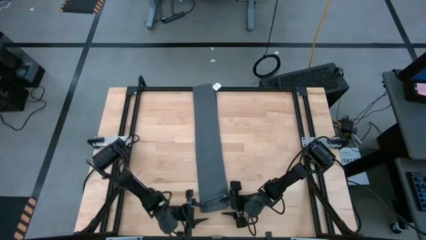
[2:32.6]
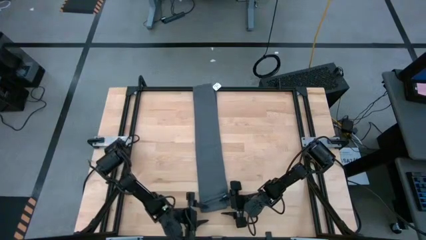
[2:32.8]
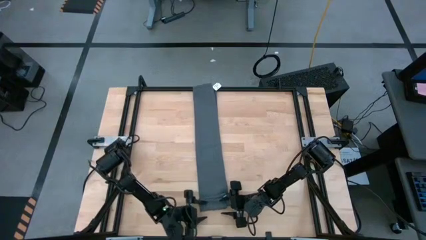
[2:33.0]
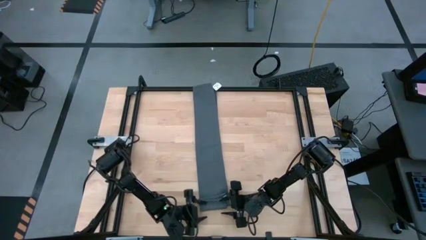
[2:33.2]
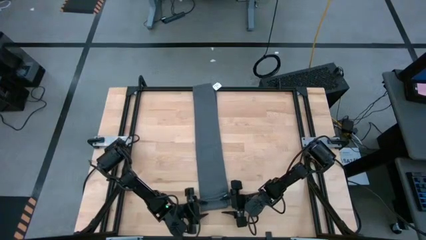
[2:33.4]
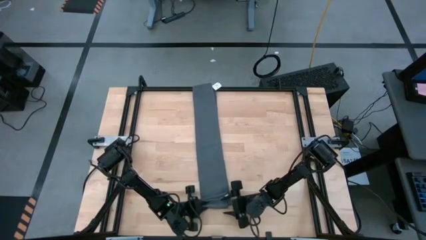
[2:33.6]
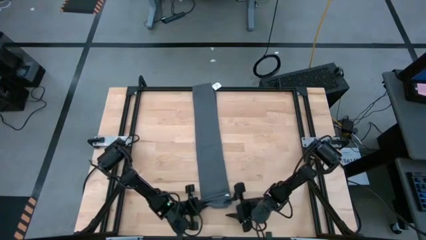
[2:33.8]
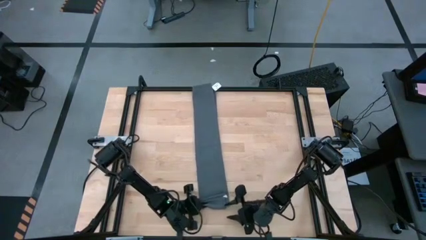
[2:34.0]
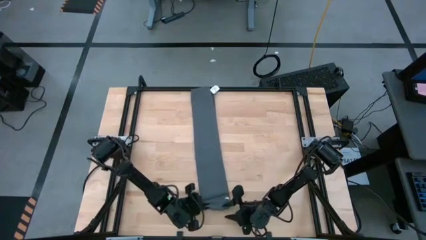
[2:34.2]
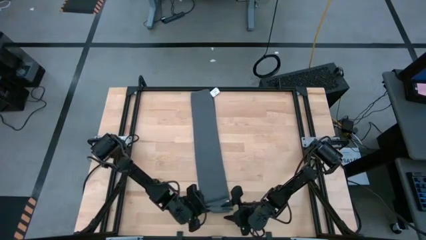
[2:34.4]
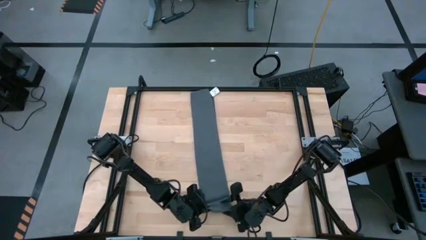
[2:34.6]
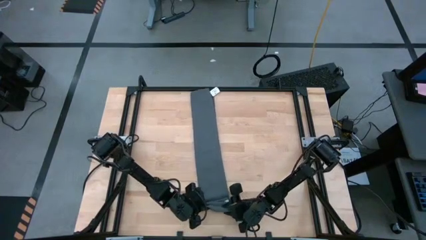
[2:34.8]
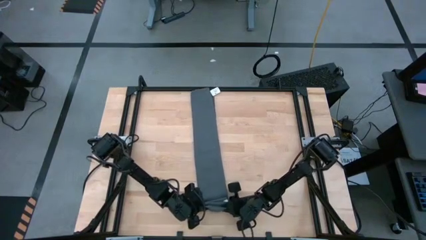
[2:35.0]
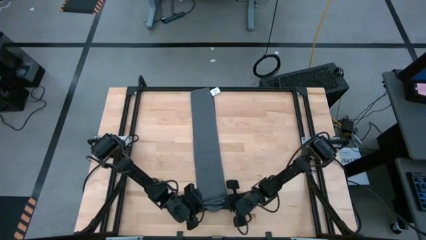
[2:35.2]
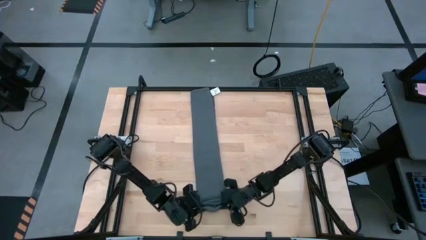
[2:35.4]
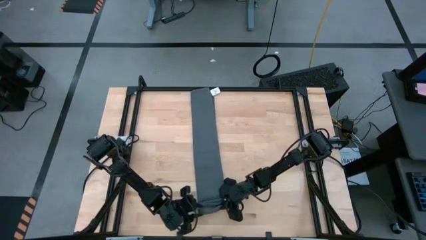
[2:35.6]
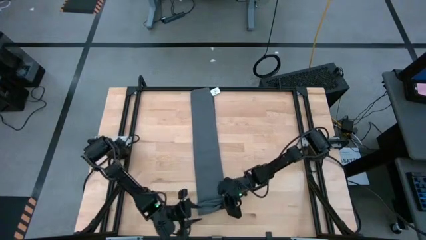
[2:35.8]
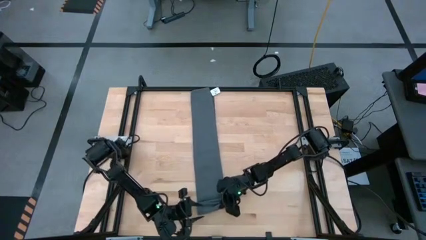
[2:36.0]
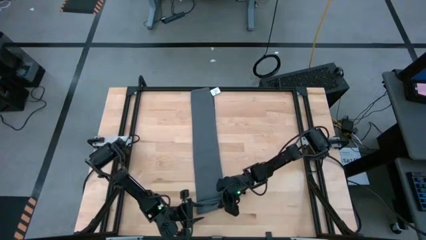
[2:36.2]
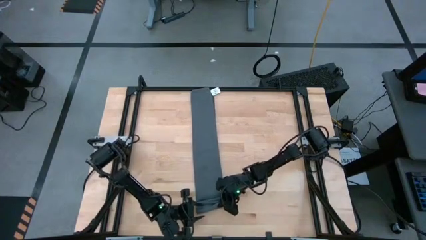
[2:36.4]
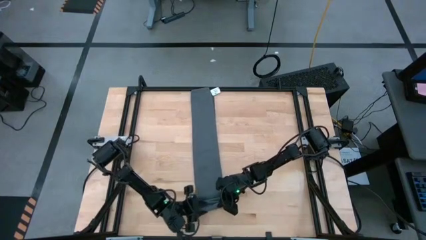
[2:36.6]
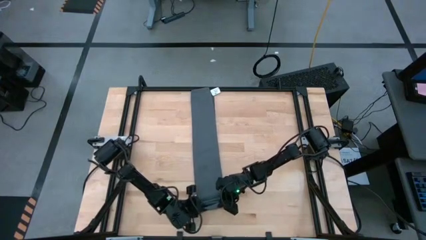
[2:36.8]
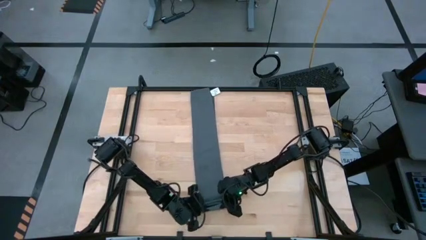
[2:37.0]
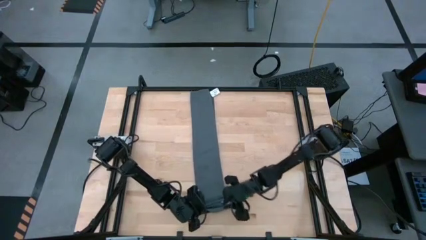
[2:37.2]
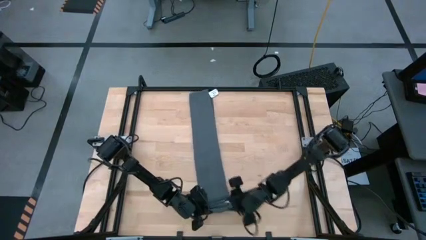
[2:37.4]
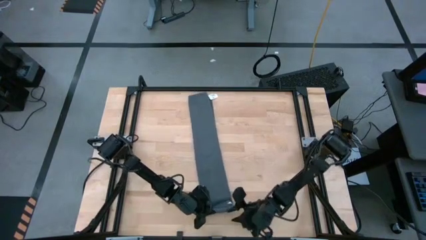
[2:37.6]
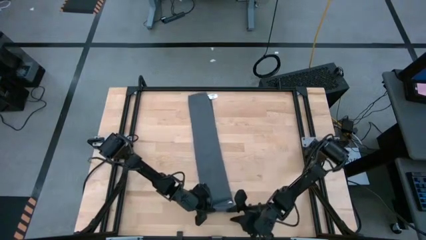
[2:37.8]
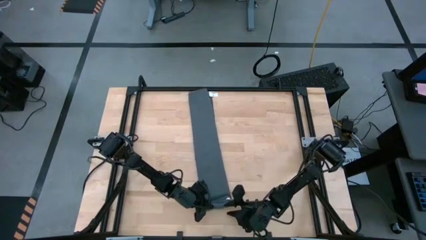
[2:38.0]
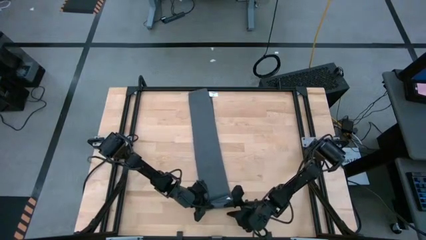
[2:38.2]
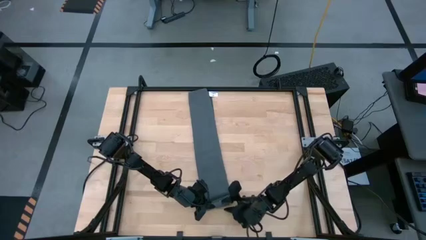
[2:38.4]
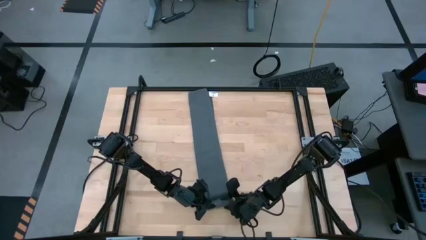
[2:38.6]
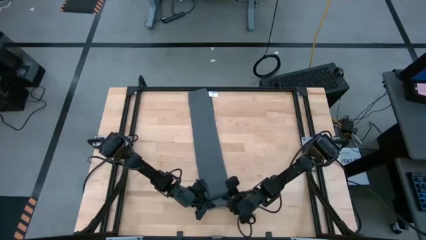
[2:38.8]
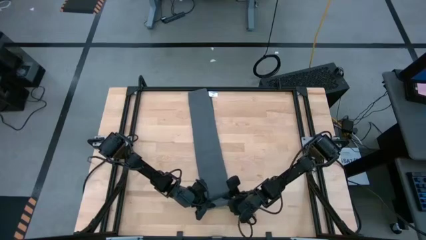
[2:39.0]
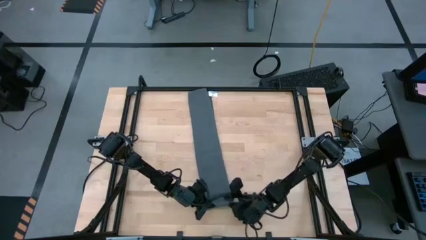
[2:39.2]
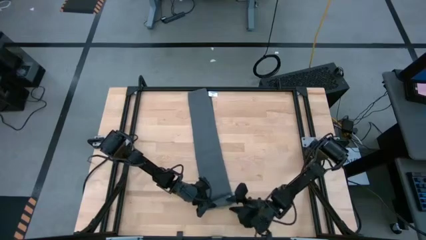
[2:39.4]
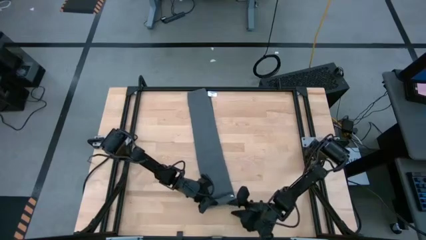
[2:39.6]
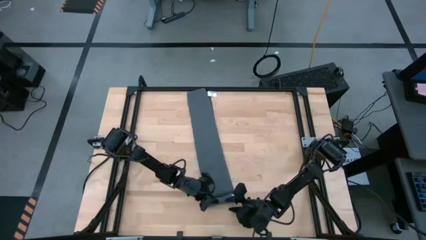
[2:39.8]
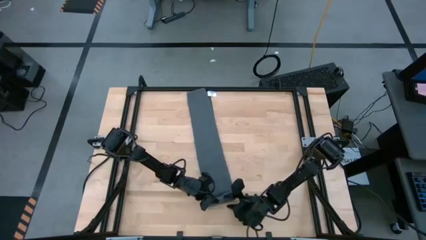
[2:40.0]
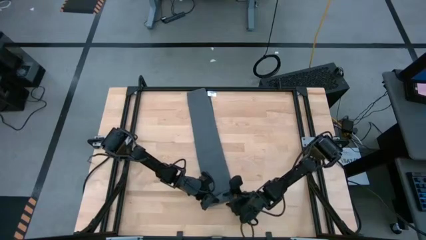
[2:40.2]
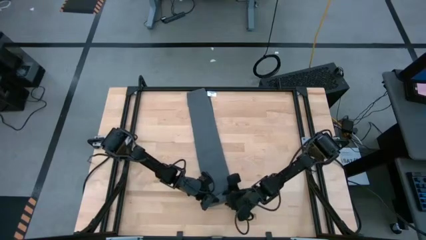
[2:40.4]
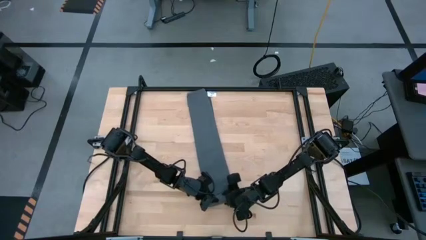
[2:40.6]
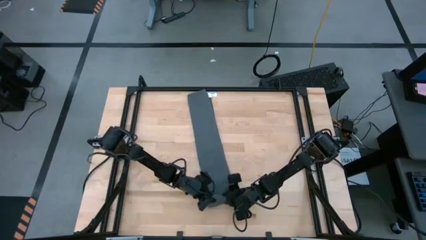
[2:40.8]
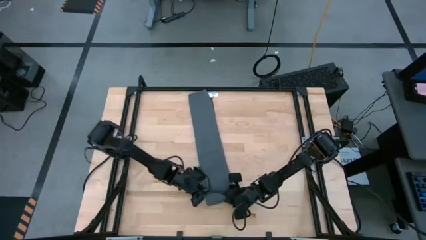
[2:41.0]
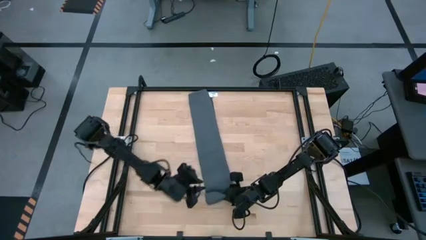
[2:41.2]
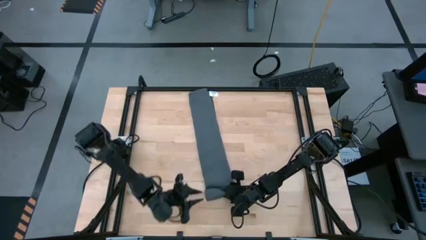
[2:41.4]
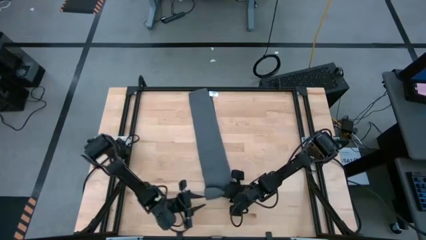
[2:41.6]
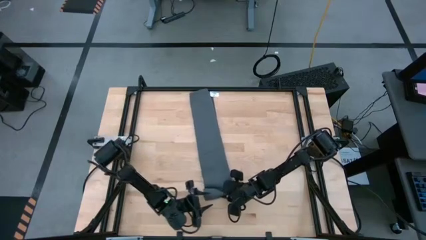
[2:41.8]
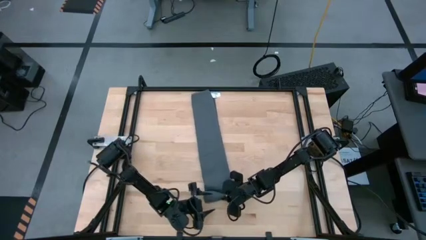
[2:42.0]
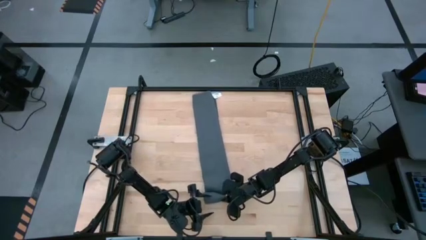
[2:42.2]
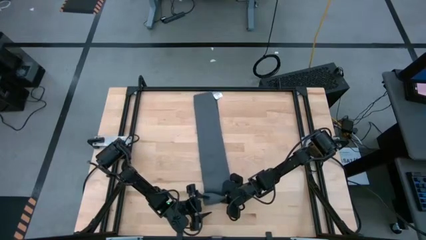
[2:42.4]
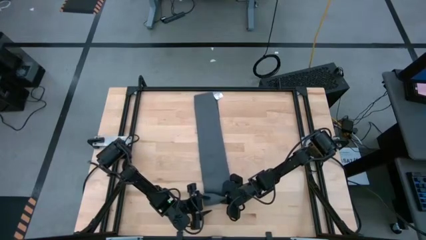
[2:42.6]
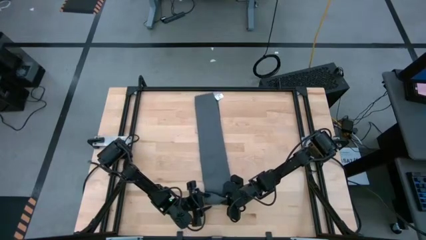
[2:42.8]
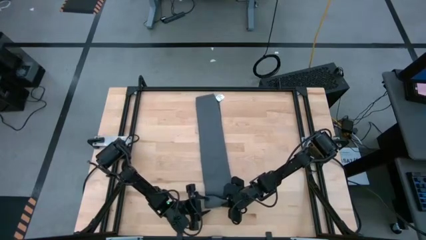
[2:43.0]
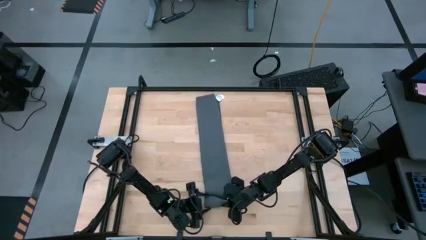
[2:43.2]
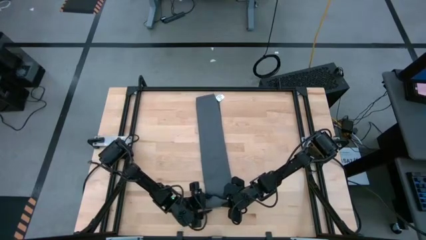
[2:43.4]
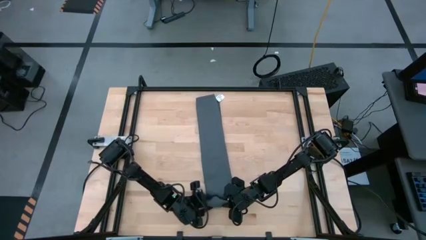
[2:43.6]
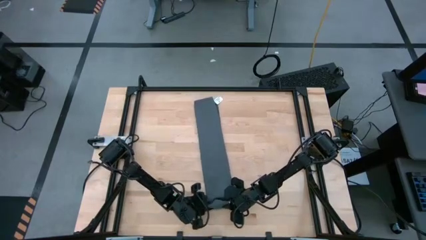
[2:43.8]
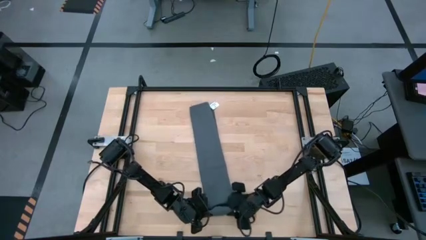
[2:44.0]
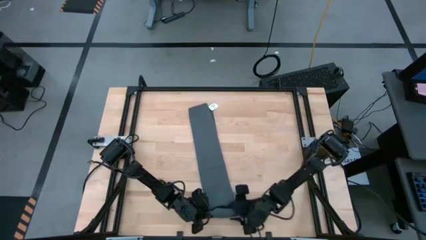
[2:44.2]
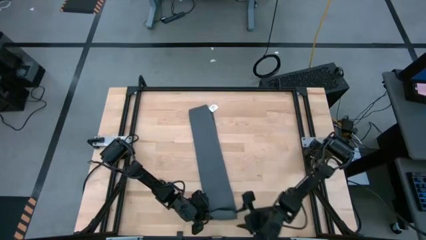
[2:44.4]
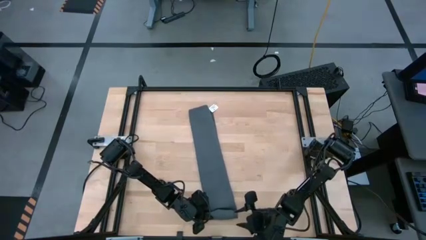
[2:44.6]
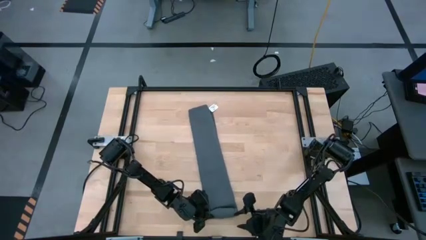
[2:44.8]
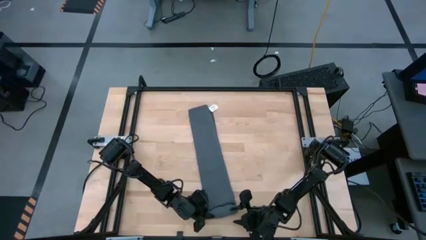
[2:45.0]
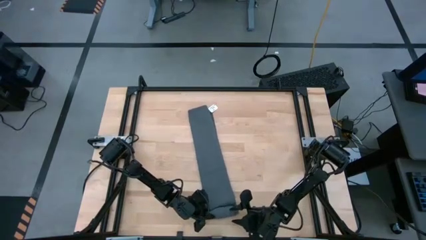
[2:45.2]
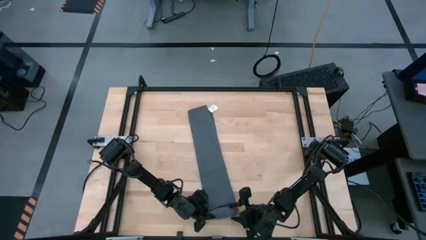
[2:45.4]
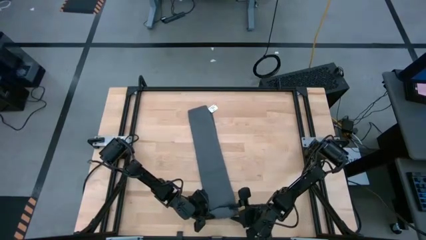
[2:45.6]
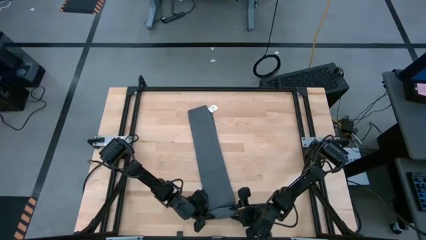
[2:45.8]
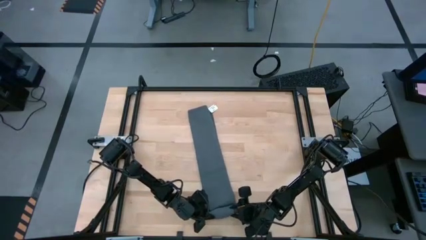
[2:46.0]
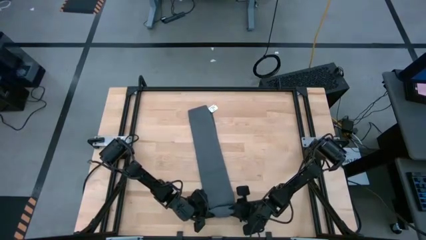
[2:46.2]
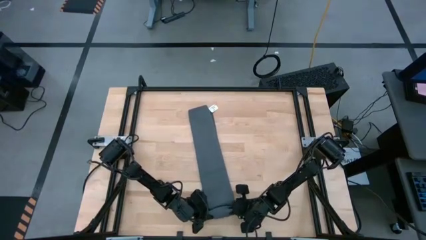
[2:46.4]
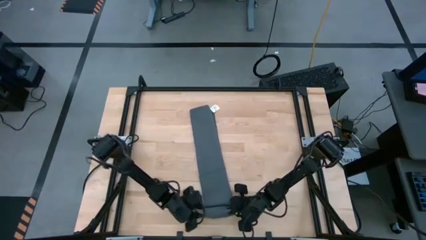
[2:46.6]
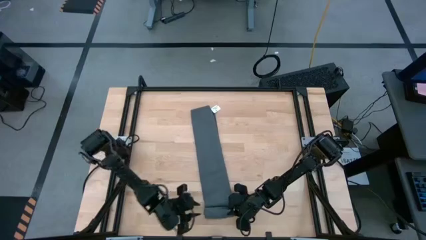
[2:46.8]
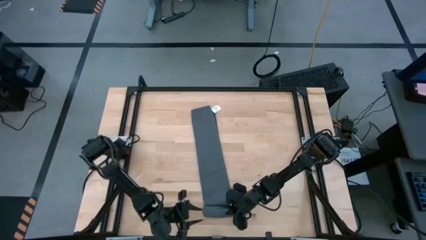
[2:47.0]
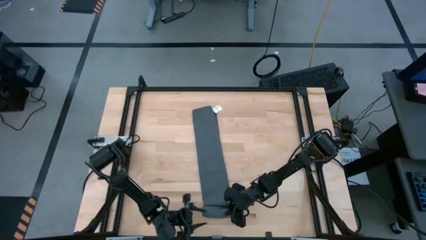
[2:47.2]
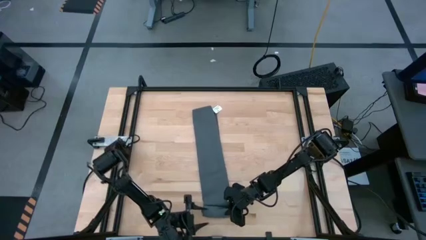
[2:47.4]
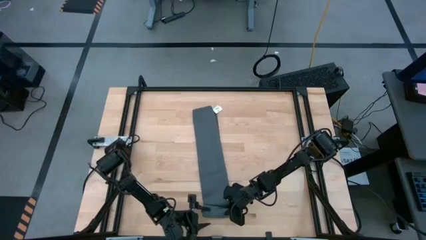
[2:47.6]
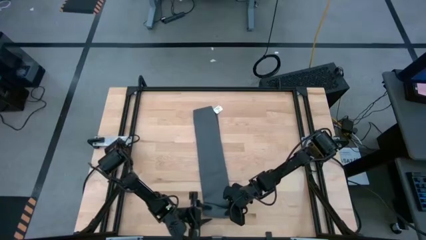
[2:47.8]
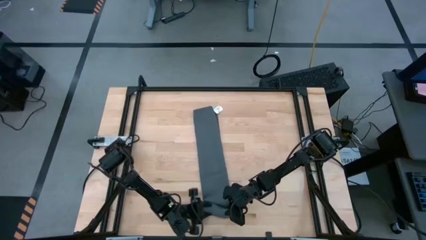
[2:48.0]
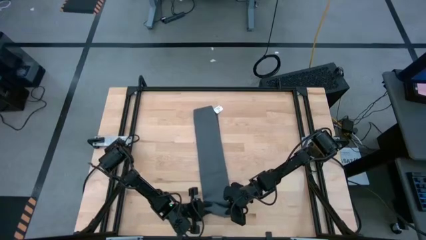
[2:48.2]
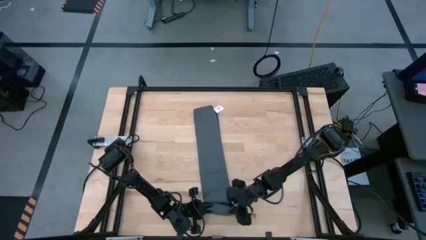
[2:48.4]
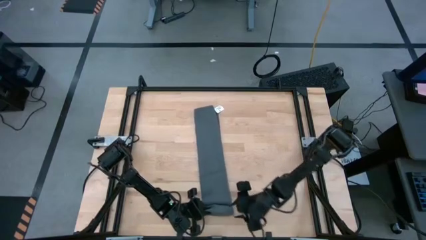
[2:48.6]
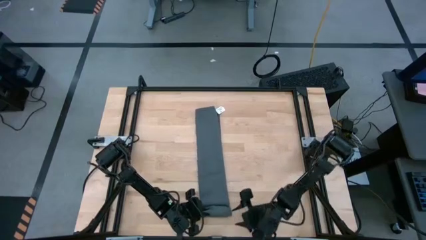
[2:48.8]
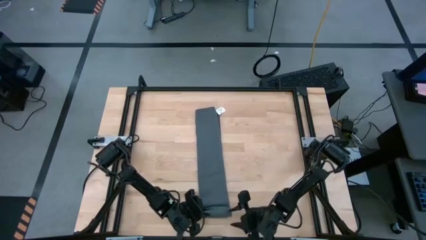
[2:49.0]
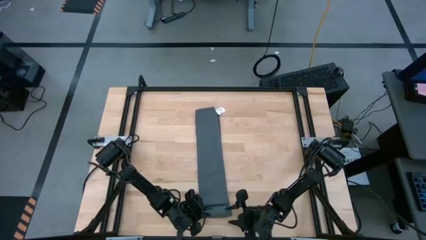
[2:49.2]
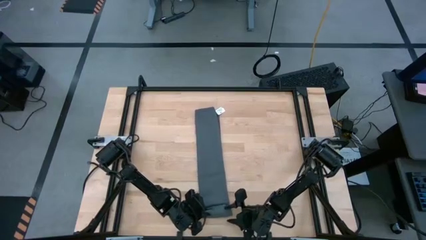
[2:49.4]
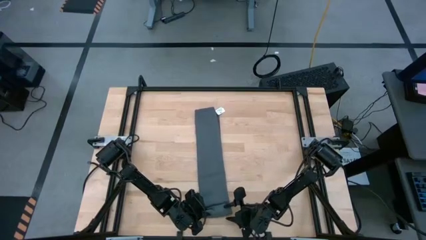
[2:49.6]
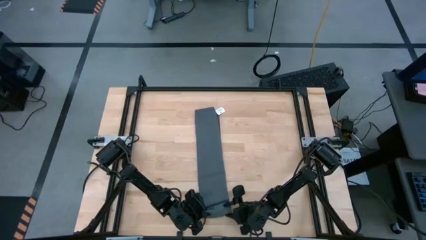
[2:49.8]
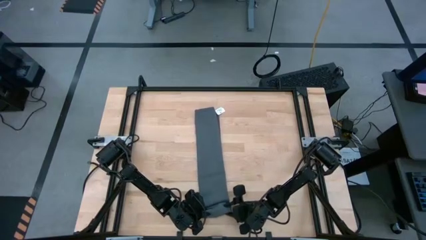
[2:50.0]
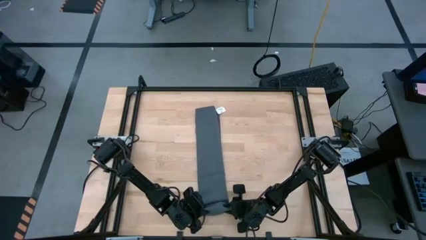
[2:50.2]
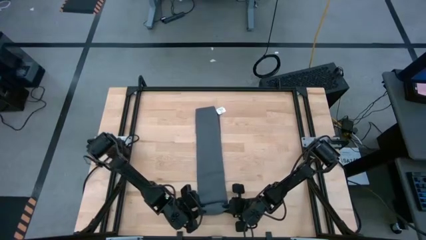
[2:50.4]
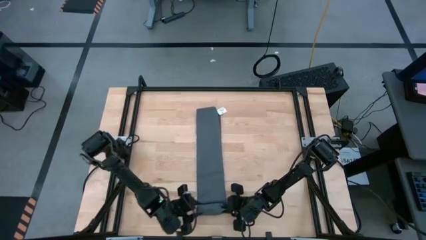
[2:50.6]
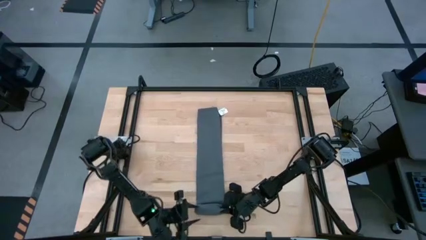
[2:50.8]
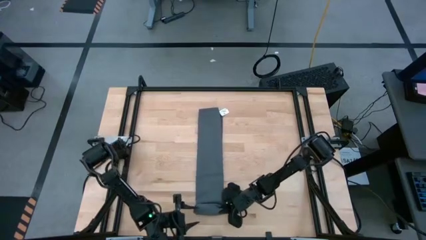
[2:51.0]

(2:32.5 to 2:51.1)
Task: Roll towel into tight, uniform cylinder
Roll the towel
